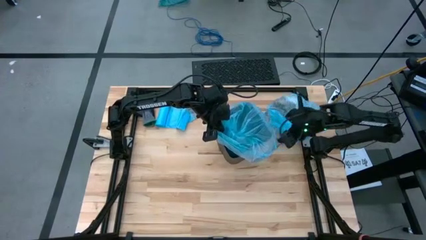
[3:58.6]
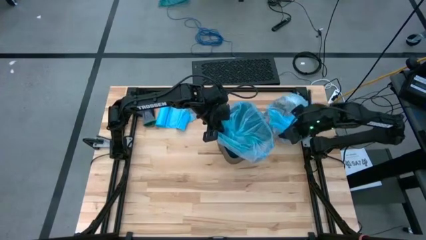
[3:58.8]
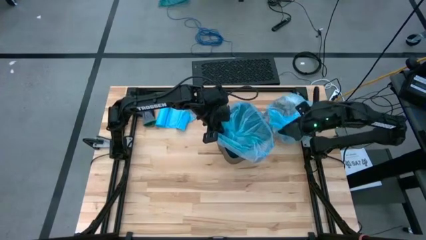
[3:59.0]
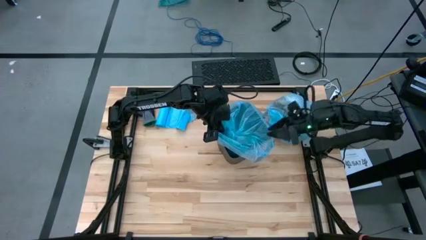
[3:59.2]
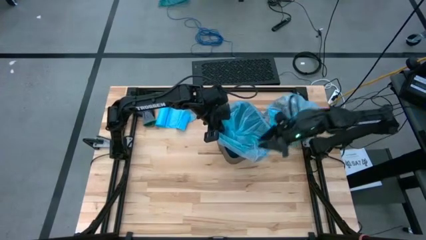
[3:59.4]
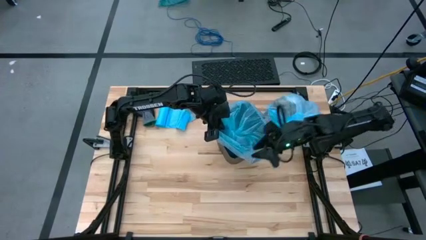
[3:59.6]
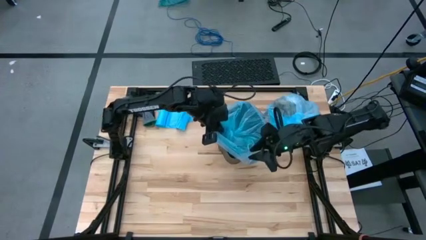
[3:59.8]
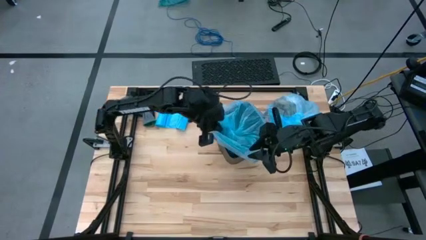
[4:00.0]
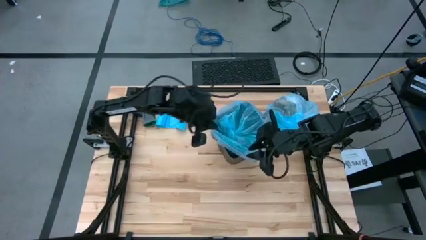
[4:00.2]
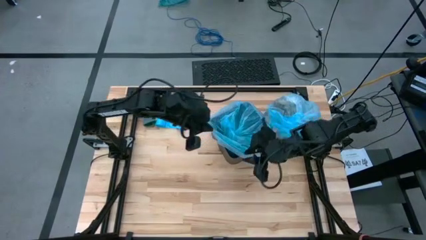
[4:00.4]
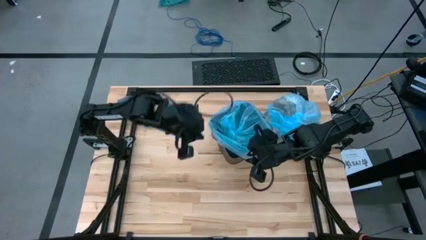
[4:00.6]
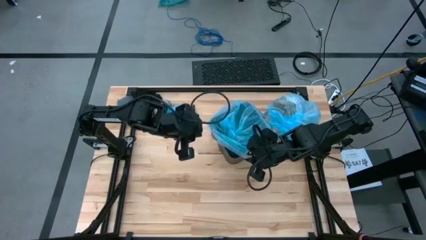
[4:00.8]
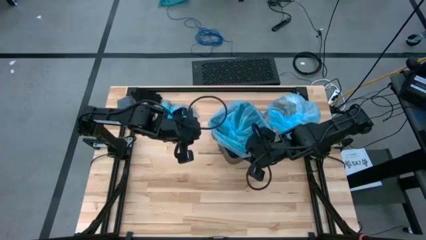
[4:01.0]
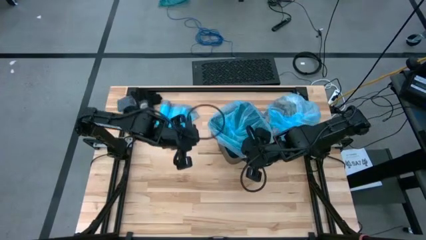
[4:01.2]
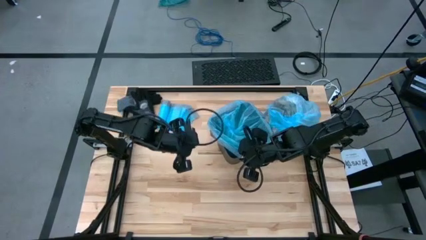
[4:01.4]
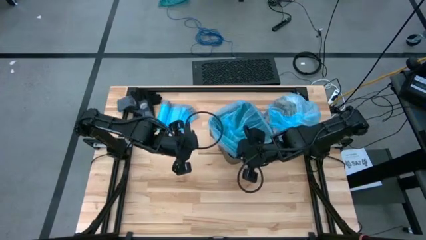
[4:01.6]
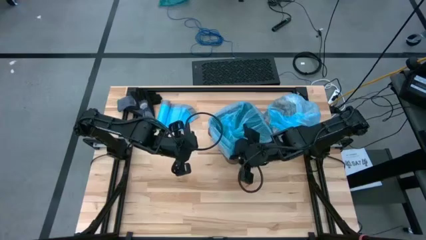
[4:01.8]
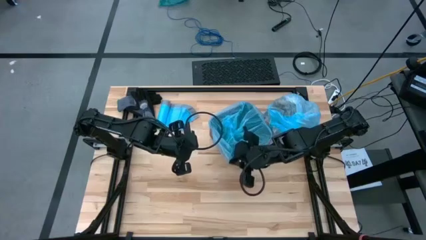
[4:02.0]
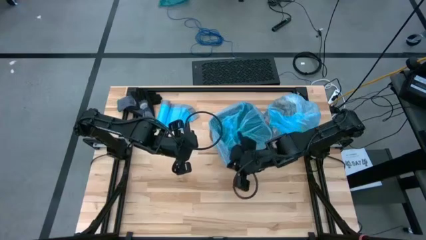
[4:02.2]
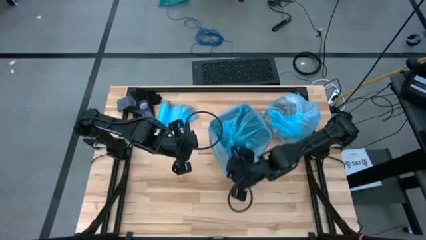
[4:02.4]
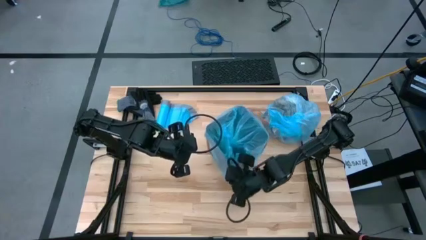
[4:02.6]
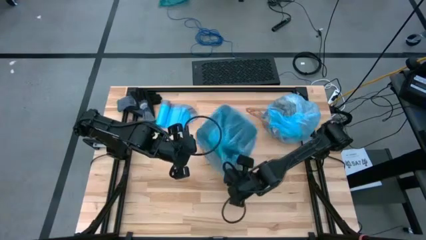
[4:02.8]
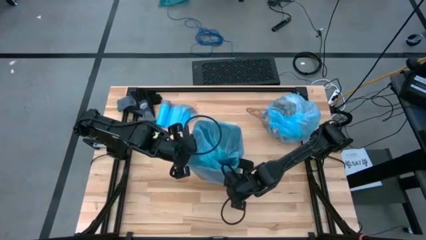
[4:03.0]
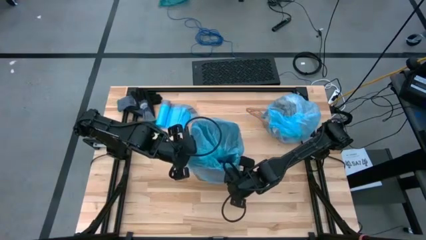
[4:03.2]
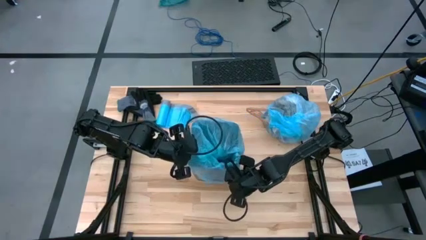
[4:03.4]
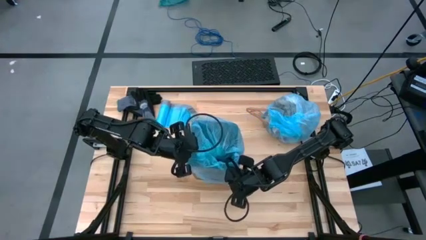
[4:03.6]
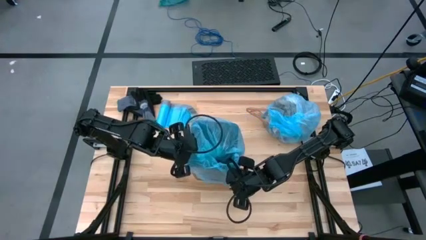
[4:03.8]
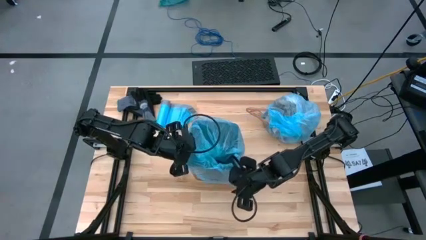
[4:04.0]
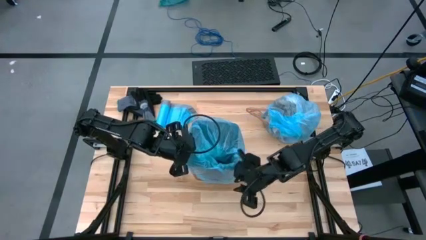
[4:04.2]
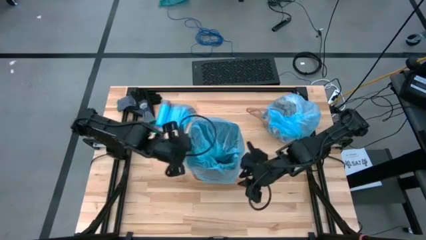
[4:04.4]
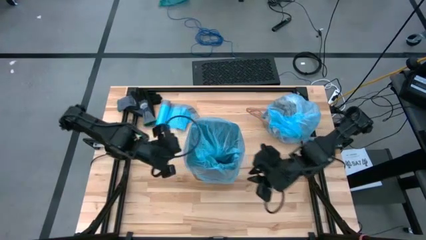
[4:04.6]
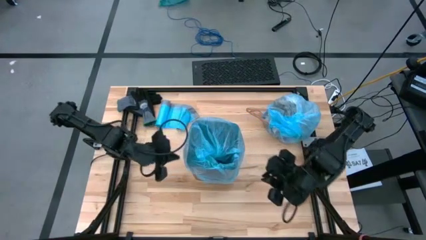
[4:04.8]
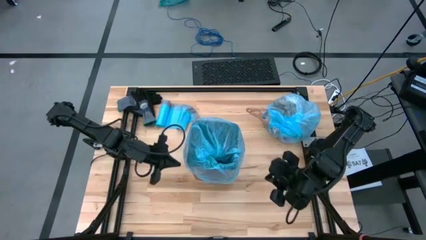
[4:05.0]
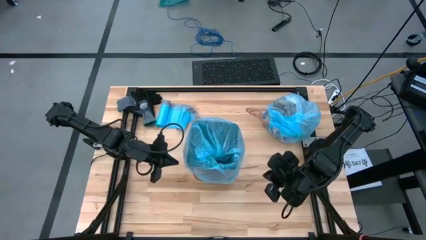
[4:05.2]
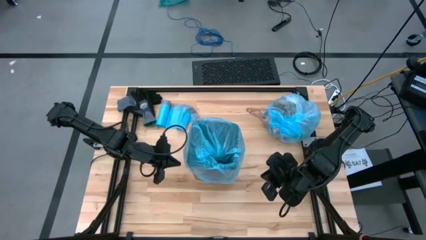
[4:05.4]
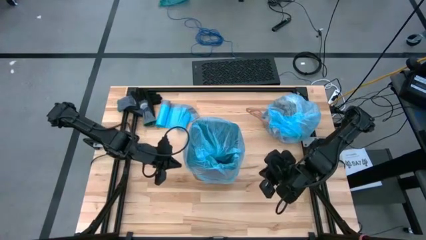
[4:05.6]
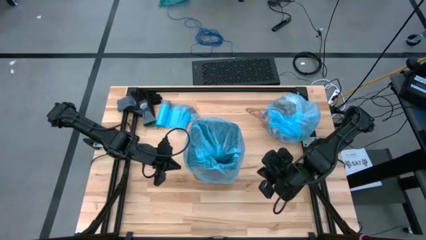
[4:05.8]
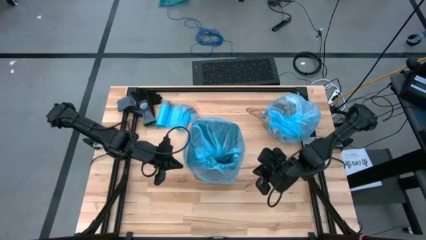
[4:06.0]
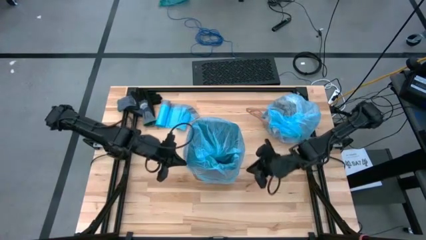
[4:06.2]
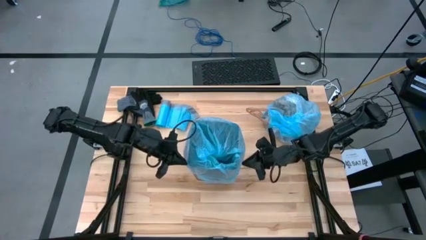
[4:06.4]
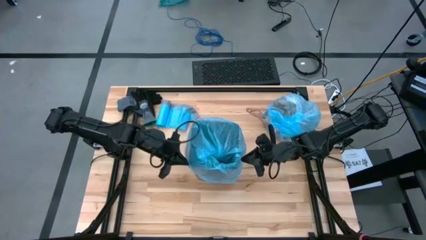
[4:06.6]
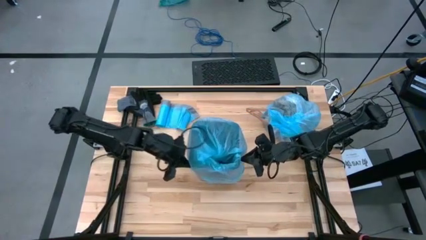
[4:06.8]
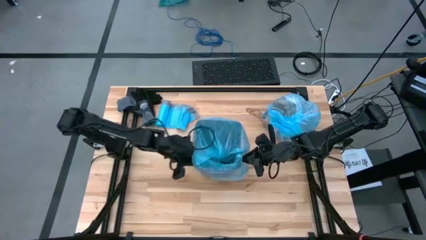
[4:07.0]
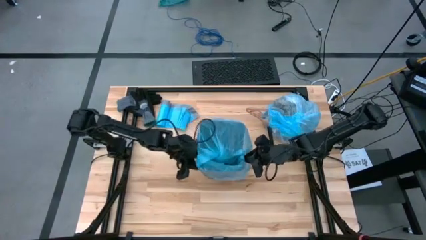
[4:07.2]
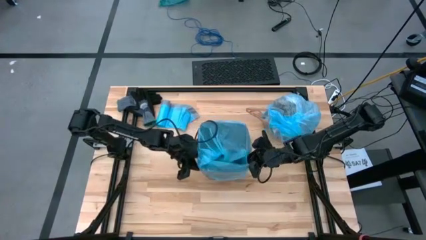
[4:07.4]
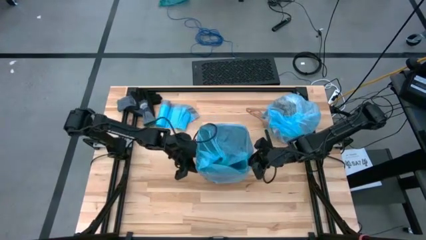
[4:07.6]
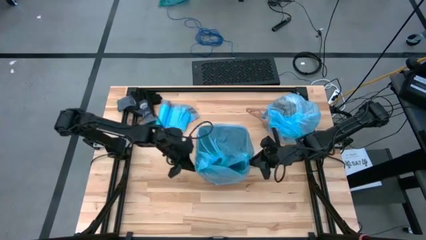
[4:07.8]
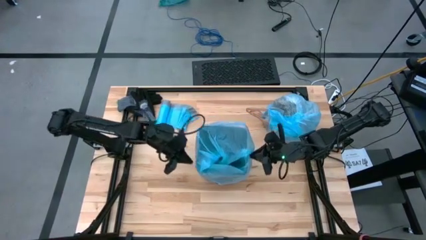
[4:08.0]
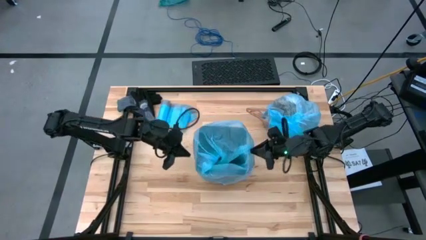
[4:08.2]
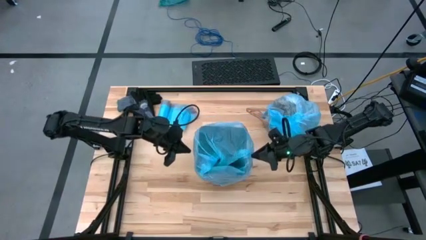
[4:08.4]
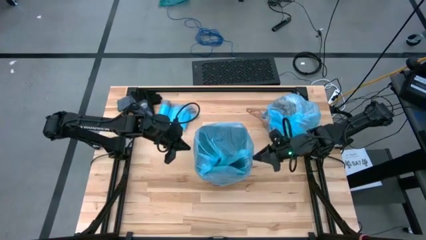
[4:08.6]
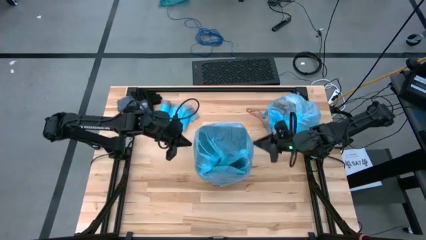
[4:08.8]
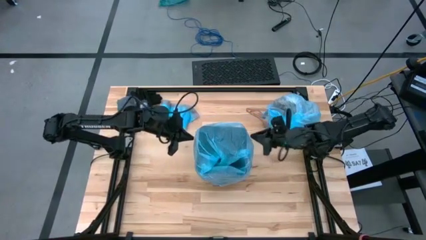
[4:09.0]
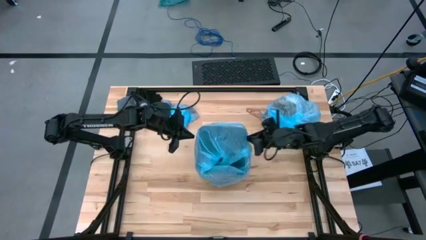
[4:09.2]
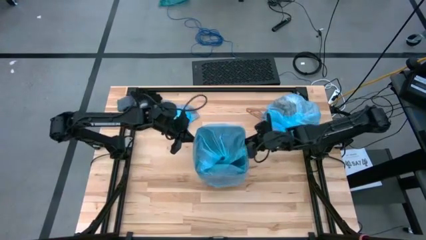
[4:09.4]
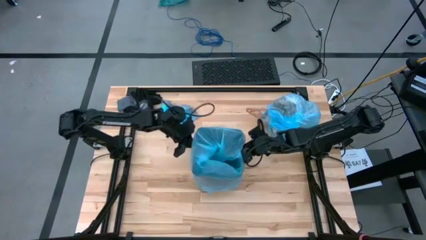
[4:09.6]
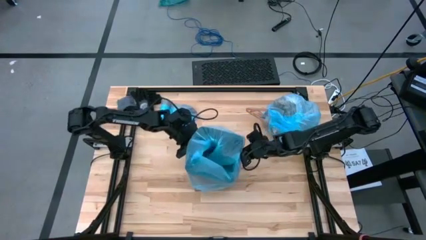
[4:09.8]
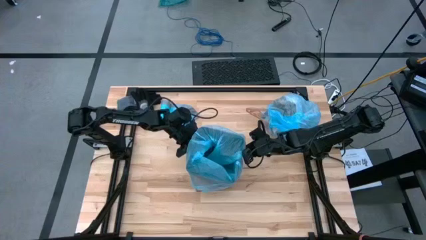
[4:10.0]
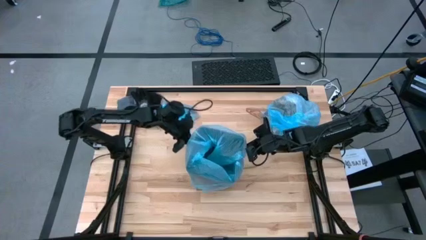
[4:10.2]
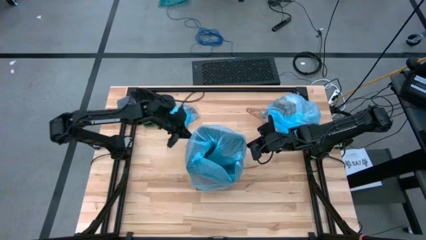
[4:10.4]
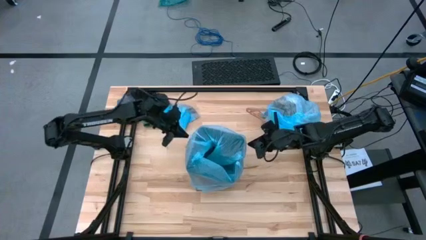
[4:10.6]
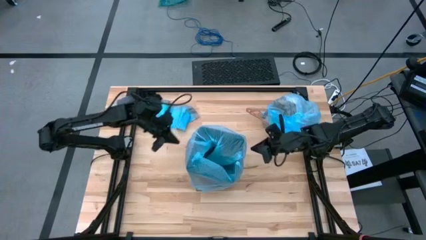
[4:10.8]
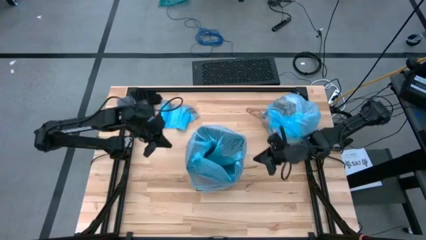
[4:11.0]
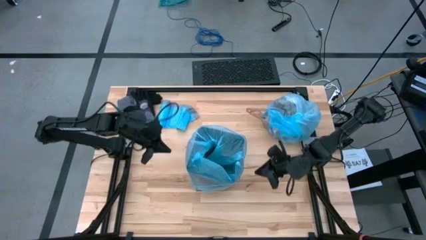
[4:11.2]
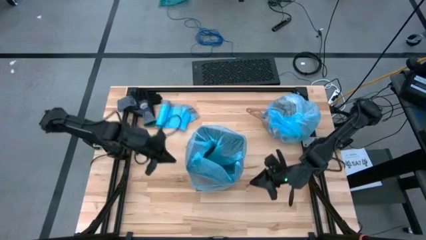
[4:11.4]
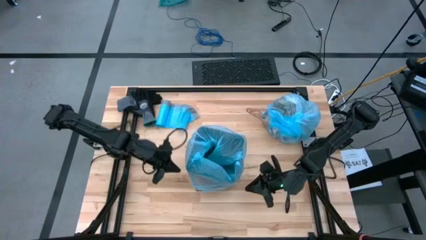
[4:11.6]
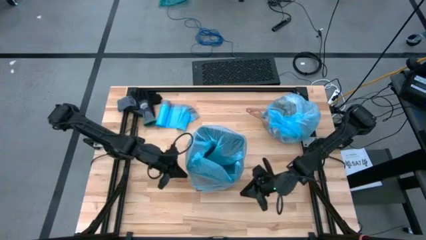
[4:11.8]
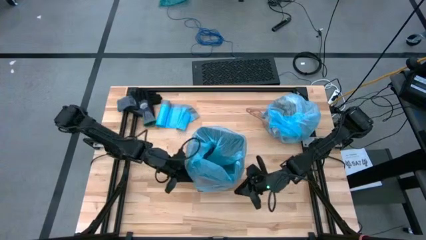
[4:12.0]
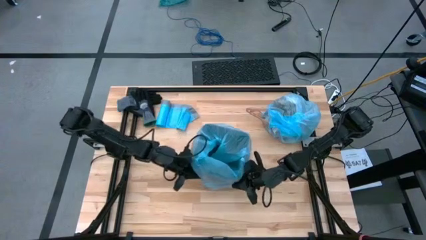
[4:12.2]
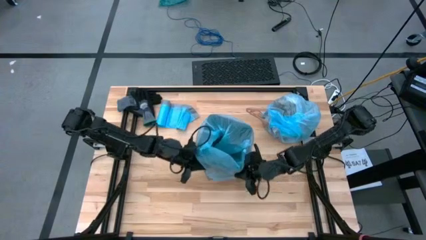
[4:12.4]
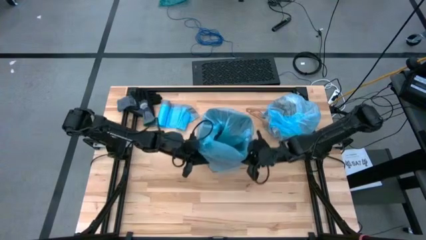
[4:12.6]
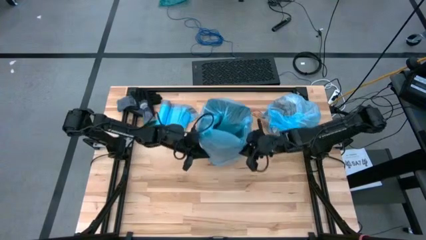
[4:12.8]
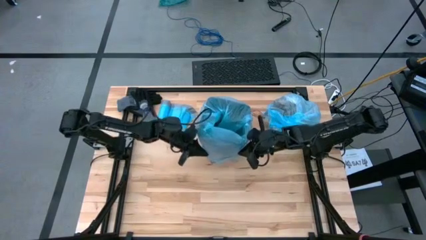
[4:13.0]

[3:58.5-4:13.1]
Task: place trash/remove bag and relplace
Put the blue trash bag into the trash bin
